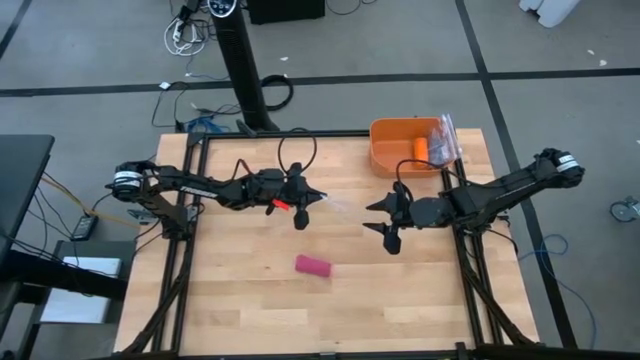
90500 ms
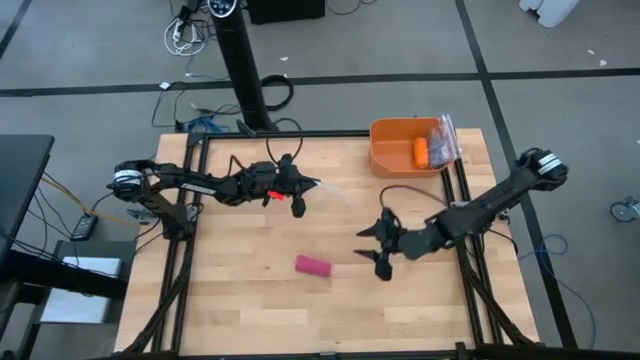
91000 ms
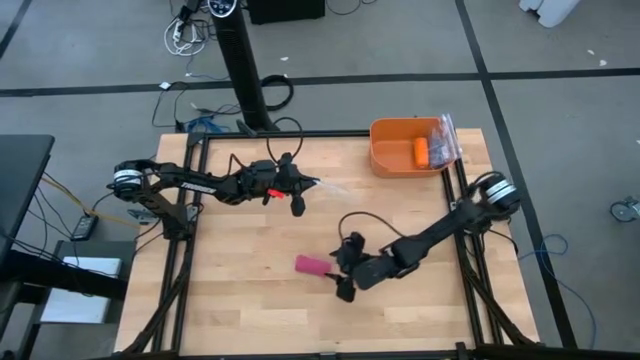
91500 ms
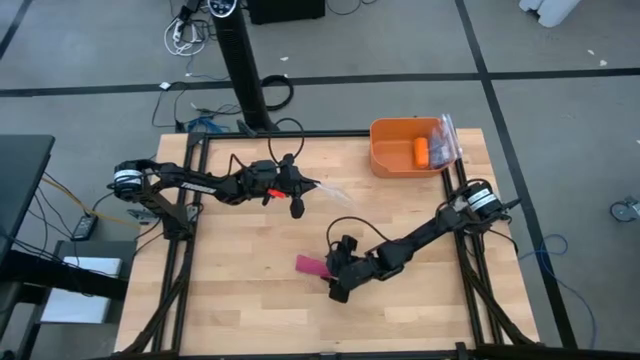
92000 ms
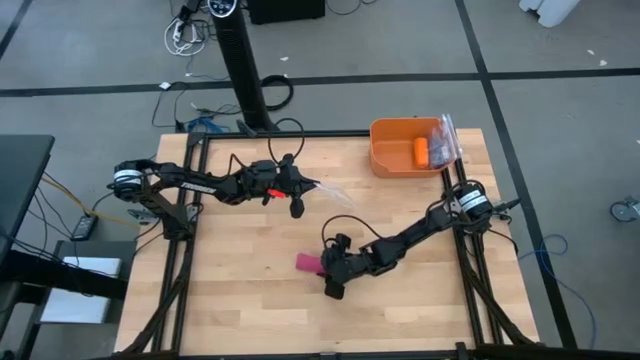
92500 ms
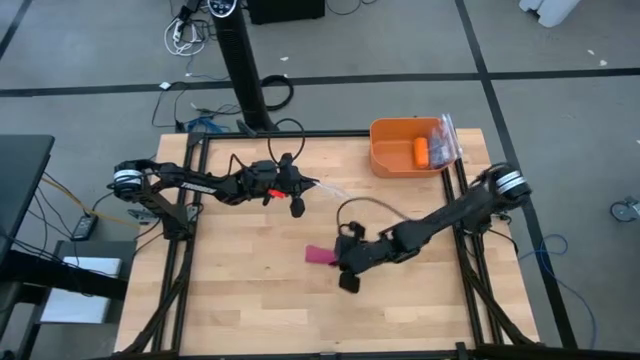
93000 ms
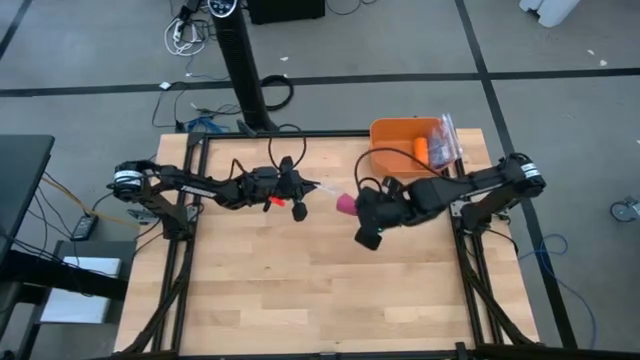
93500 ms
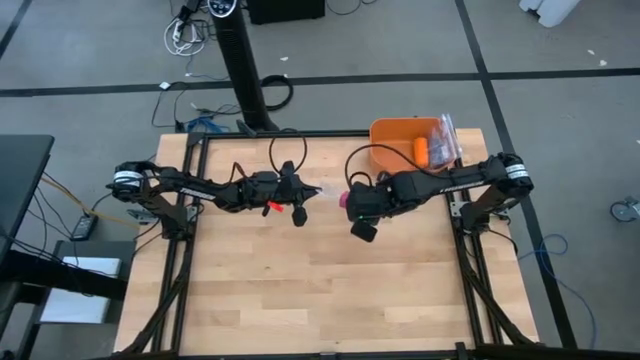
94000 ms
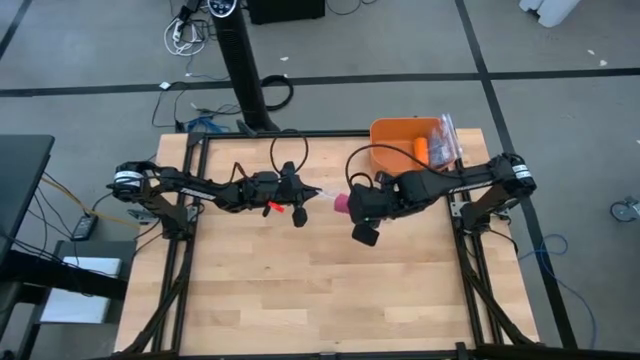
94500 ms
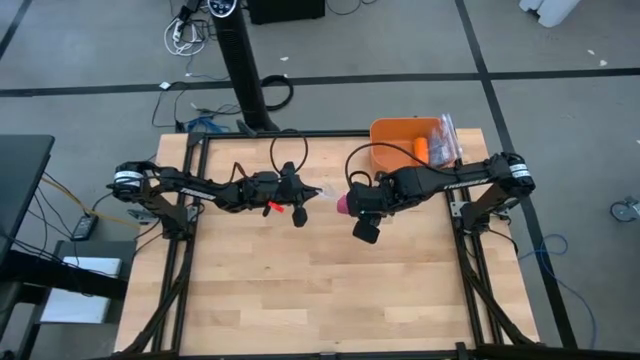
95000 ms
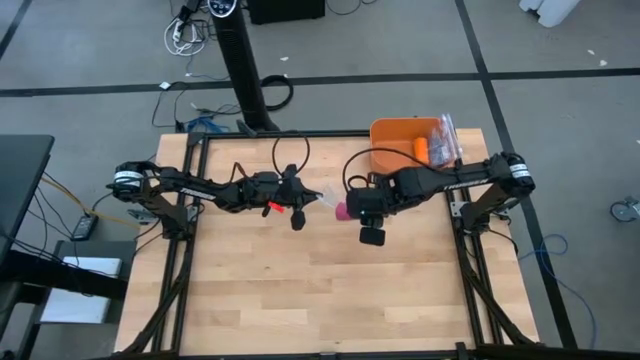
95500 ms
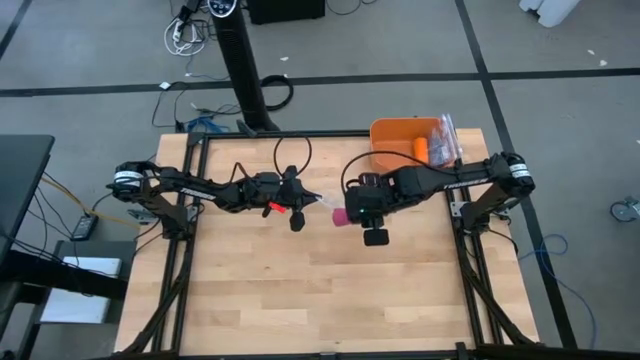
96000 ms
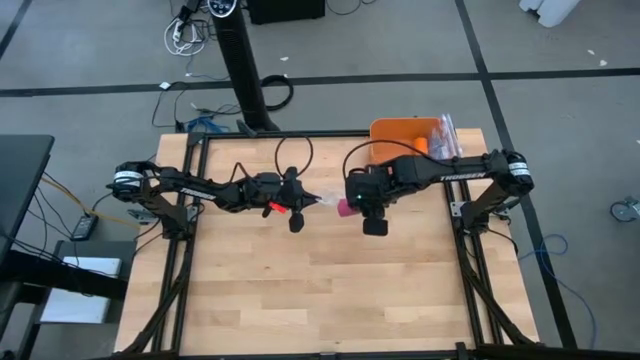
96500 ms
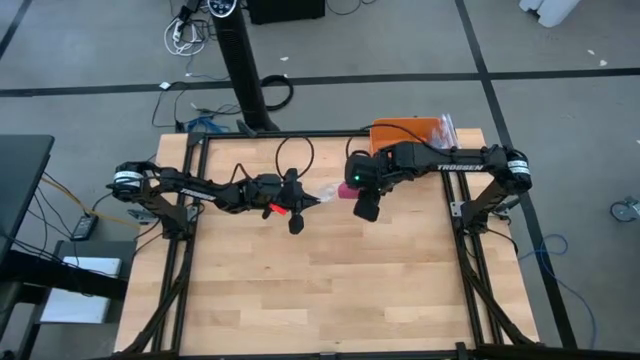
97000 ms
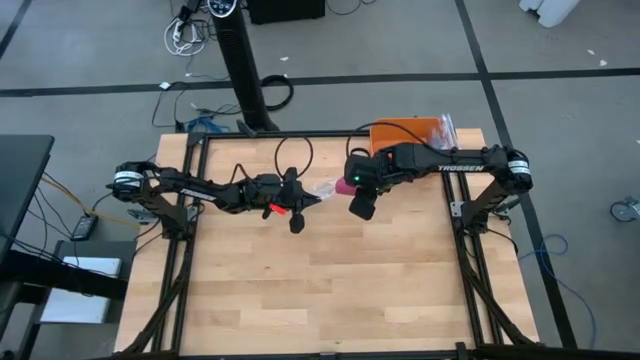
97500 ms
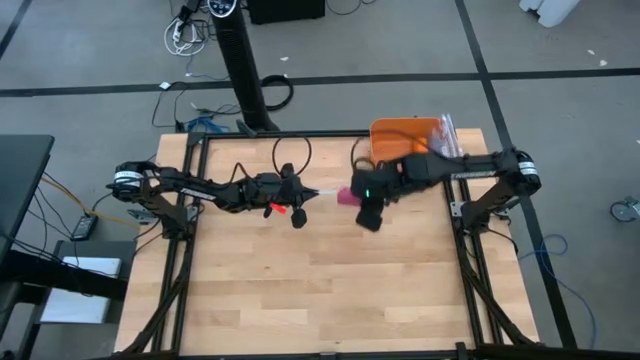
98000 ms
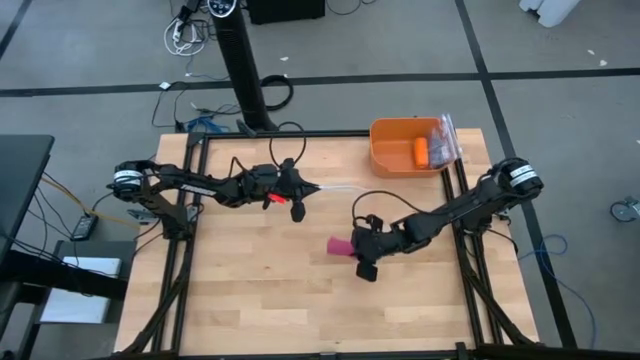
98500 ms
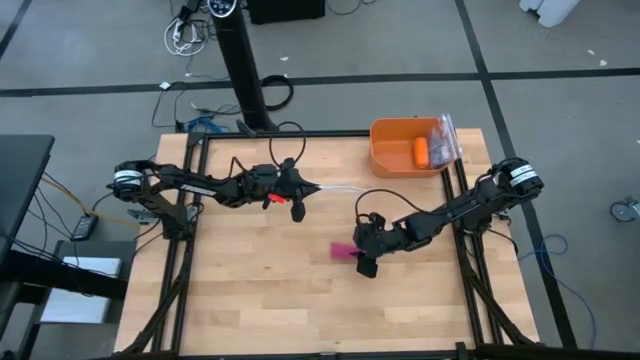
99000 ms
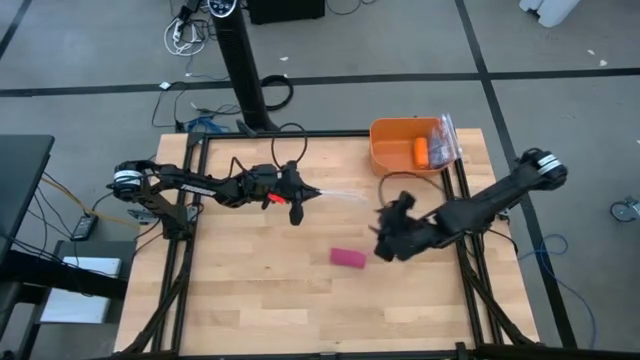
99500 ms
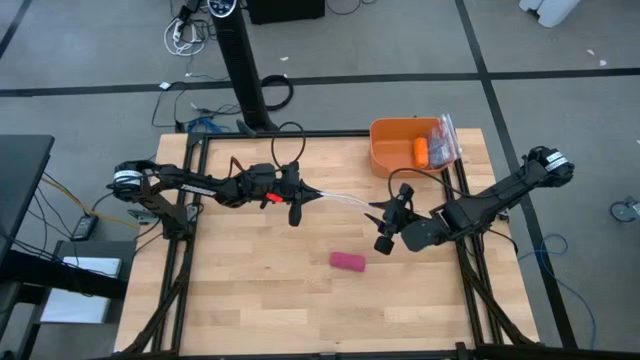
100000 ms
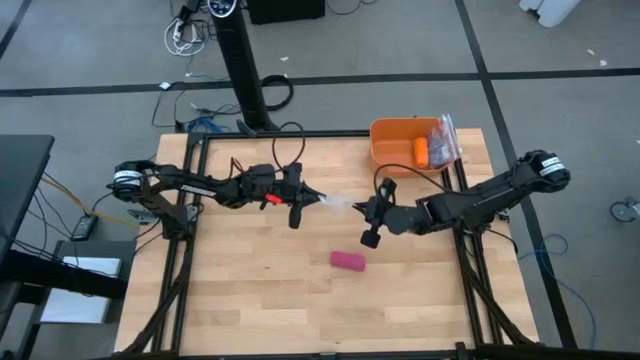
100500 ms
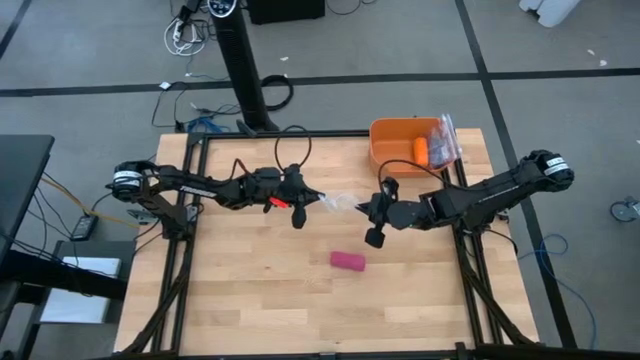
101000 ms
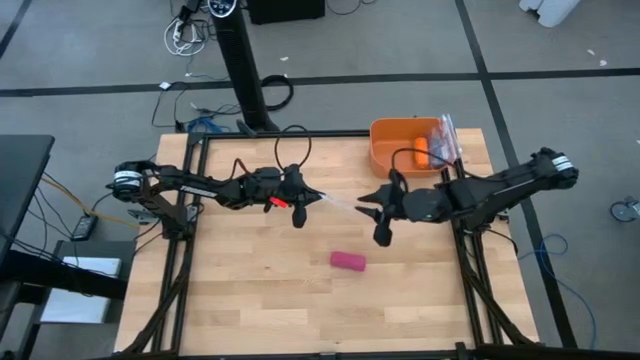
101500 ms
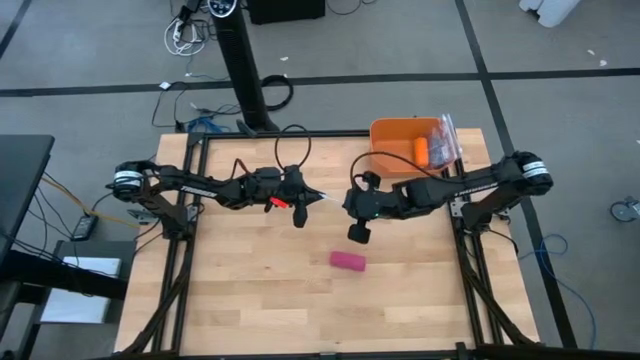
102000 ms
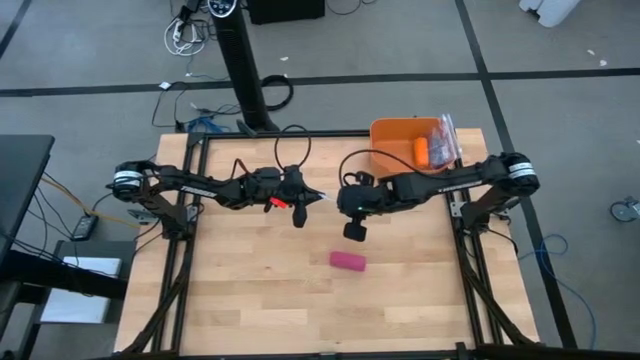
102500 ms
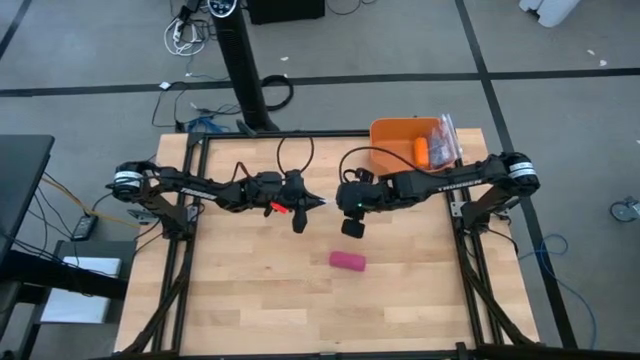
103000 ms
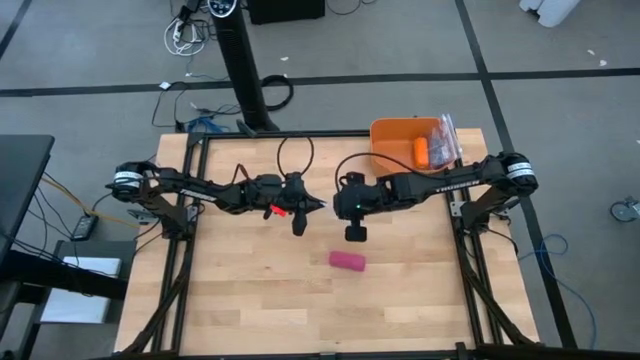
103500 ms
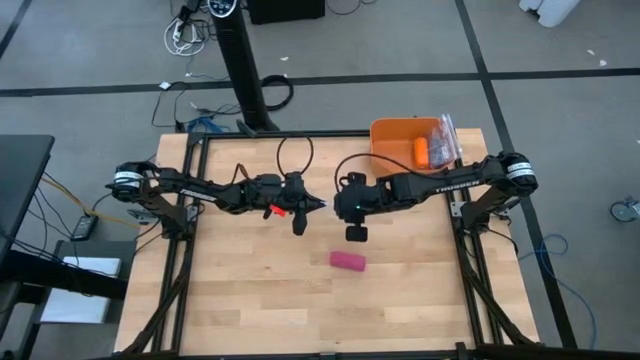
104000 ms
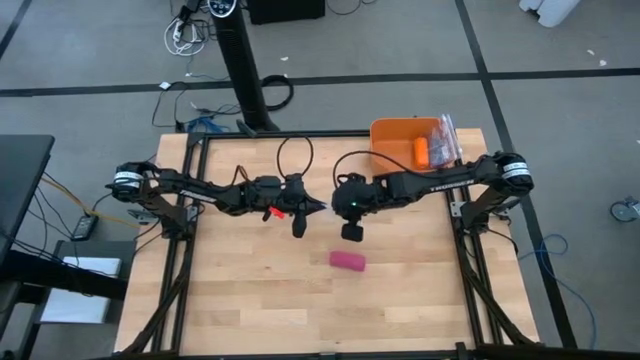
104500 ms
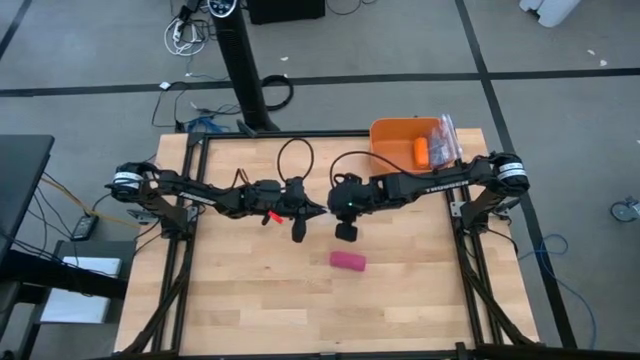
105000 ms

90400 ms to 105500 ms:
Task: Roll bandage
Insert the pink bandage into the transparent zip bag

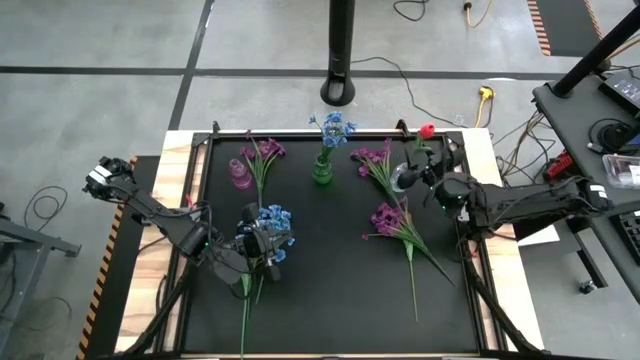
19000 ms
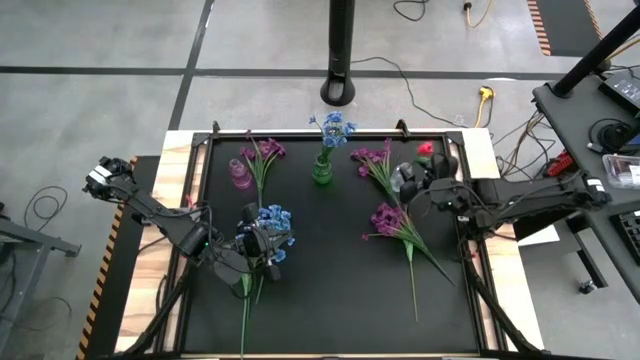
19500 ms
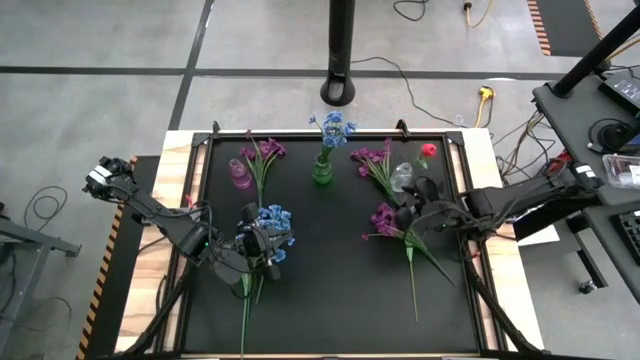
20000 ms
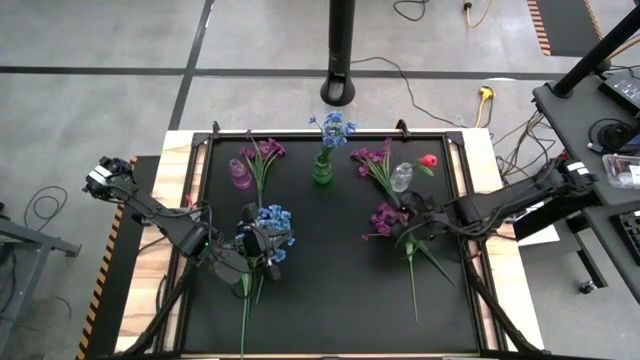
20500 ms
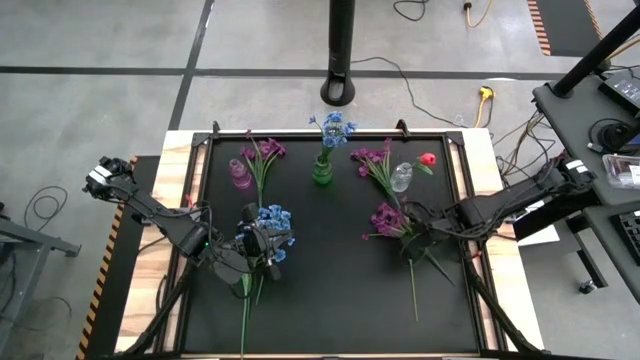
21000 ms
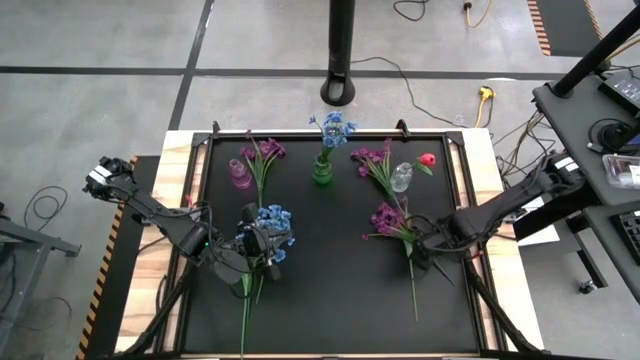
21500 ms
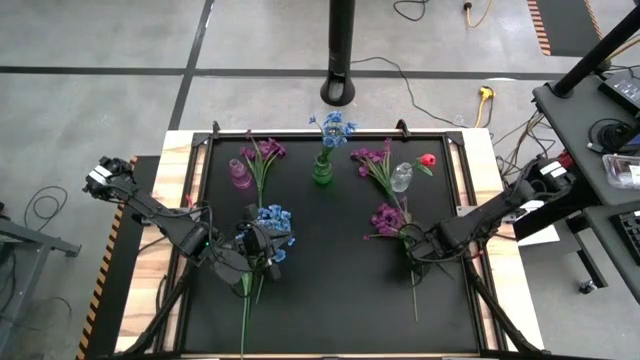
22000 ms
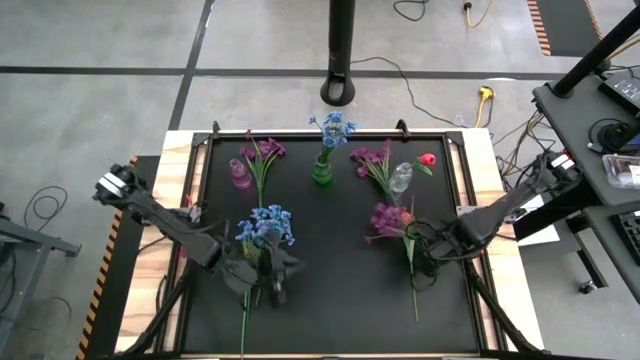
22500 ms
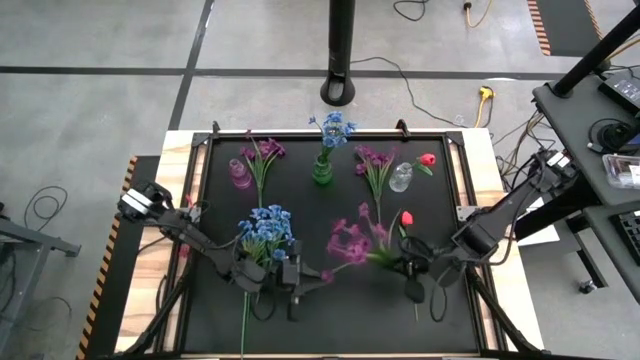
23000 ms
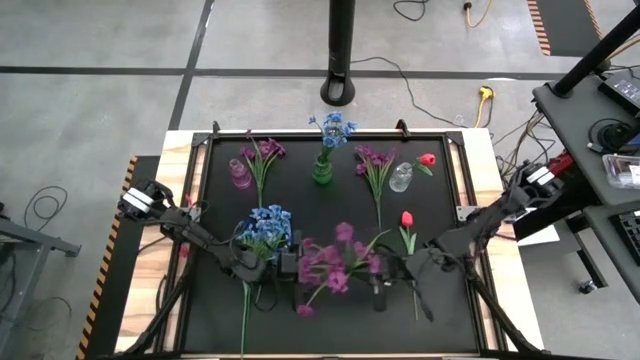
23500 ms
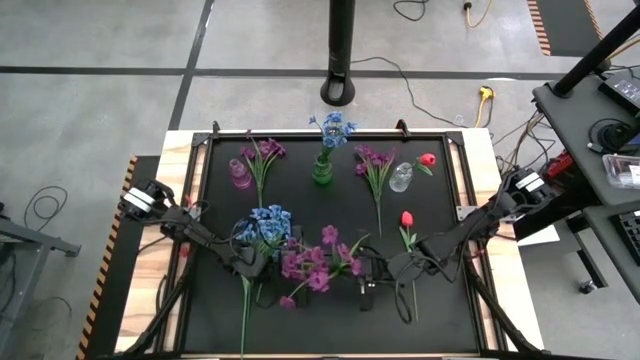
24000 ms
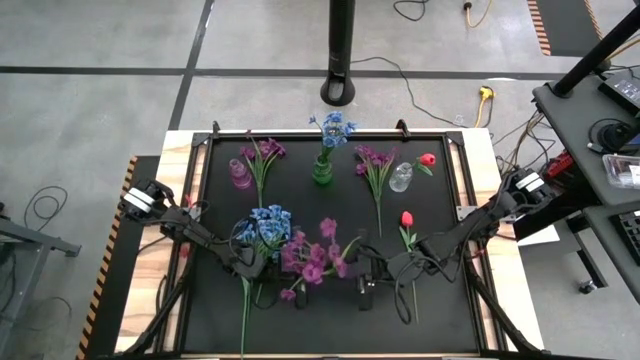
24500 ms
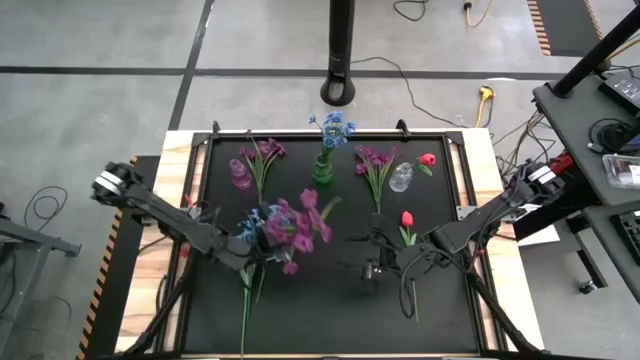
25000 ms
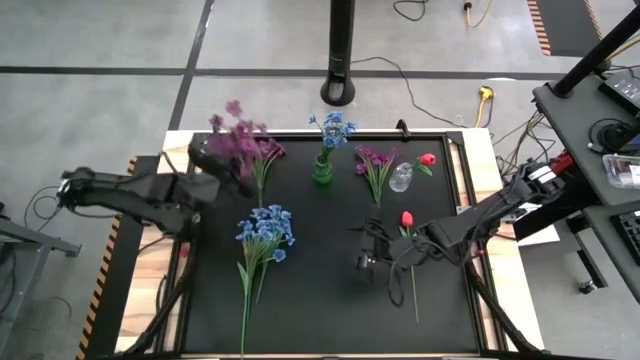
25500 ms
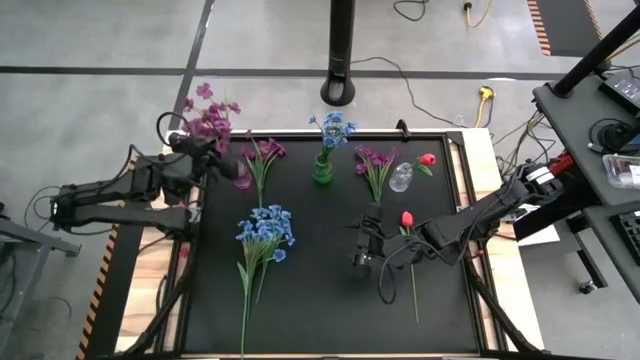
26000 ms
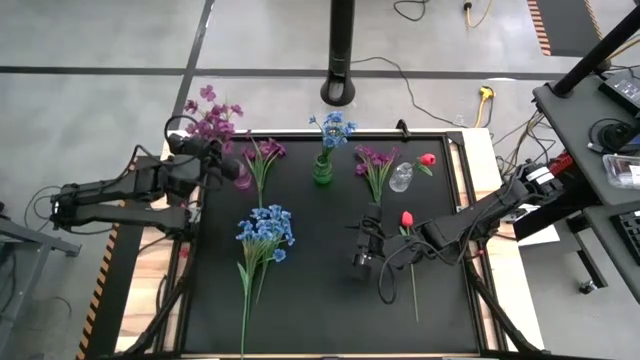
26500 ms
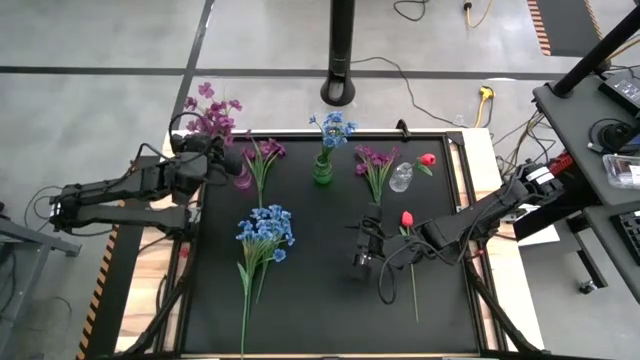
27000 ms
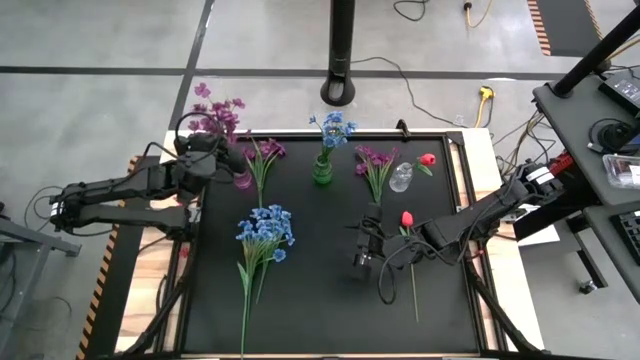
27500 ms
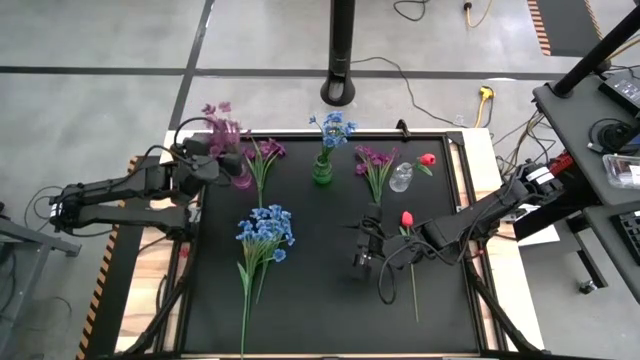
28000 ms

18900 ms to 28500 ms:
Task: Sort flowers into vase by color
Put the middle right violet flowers into the violet vase
